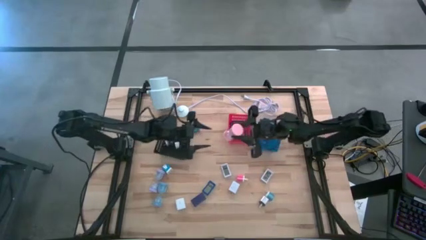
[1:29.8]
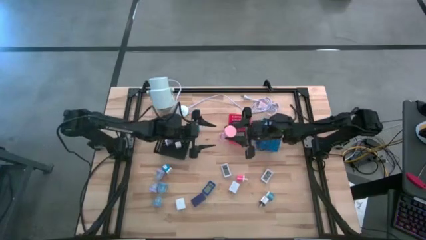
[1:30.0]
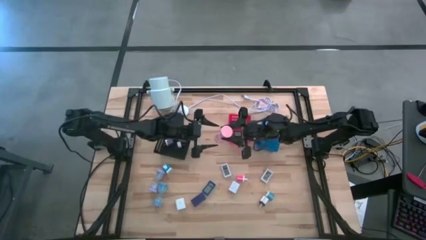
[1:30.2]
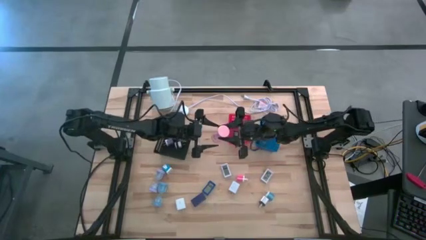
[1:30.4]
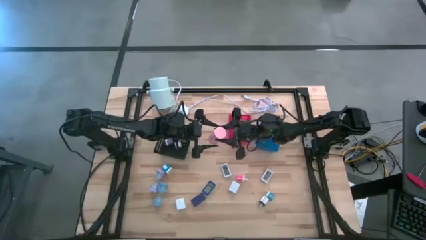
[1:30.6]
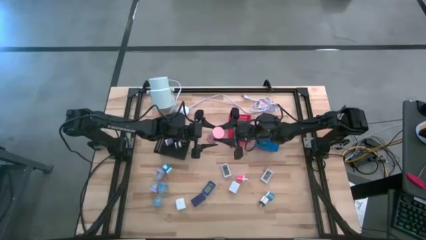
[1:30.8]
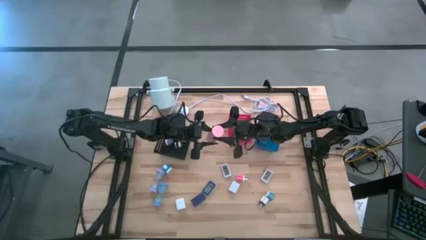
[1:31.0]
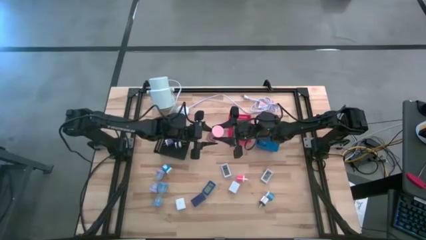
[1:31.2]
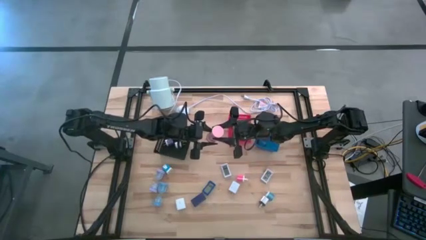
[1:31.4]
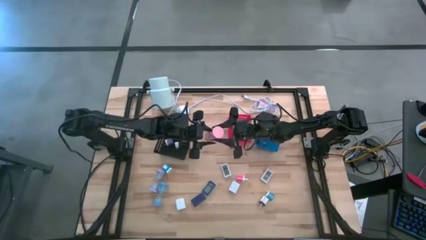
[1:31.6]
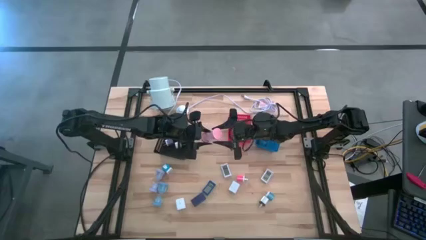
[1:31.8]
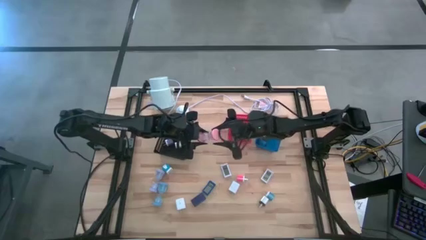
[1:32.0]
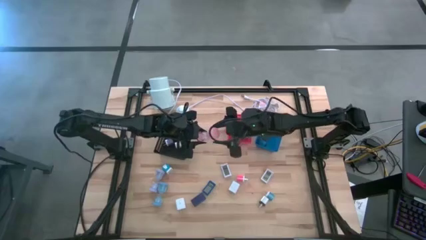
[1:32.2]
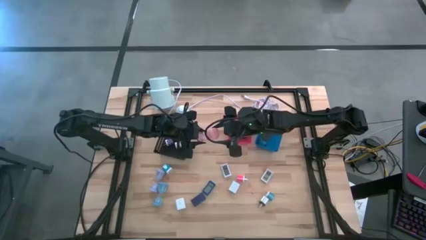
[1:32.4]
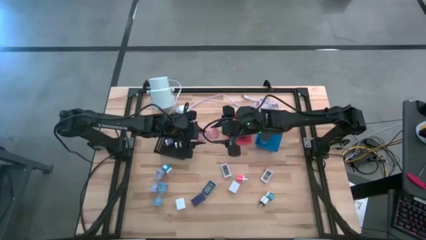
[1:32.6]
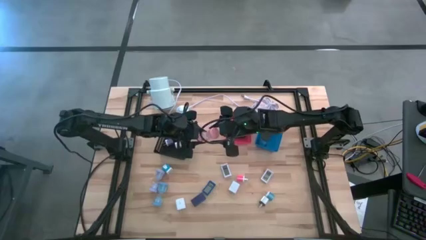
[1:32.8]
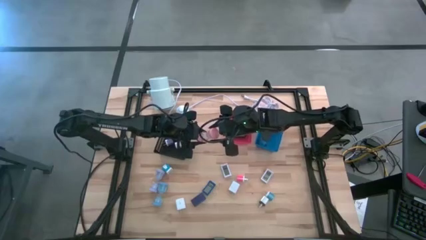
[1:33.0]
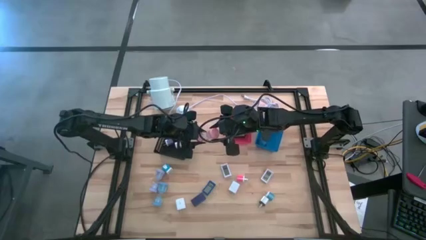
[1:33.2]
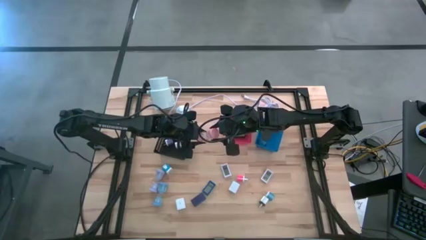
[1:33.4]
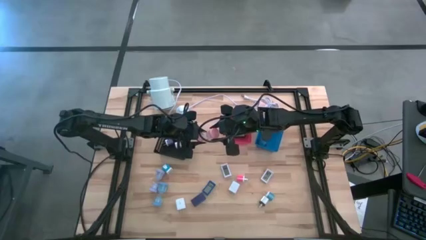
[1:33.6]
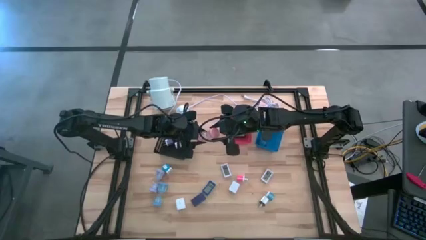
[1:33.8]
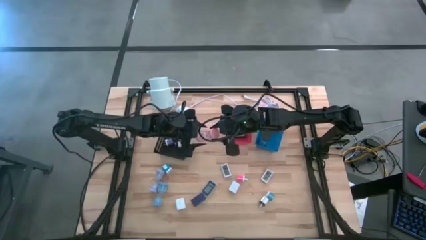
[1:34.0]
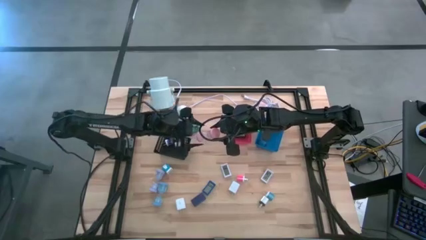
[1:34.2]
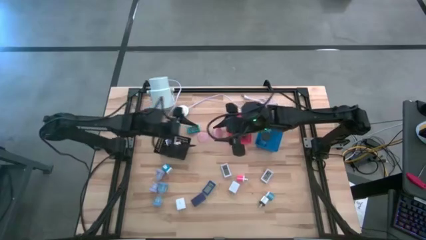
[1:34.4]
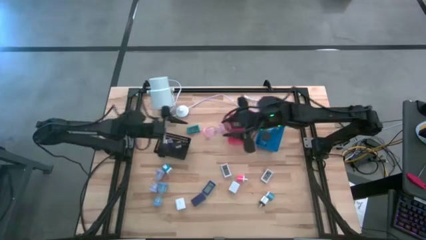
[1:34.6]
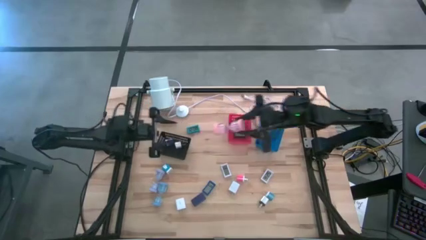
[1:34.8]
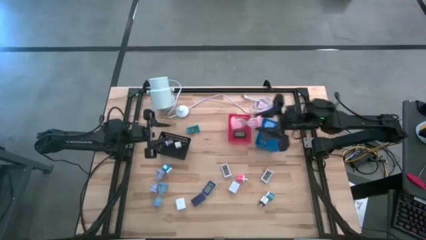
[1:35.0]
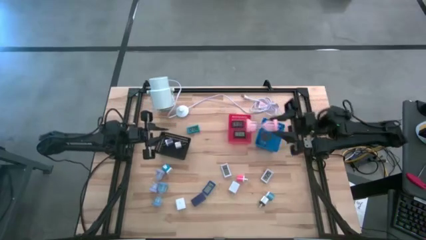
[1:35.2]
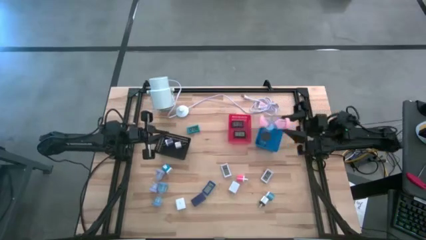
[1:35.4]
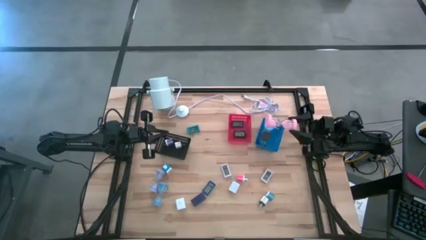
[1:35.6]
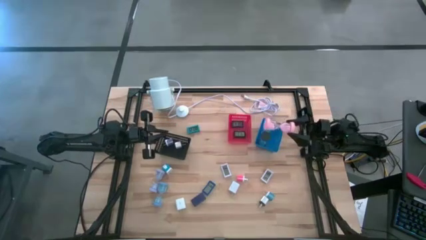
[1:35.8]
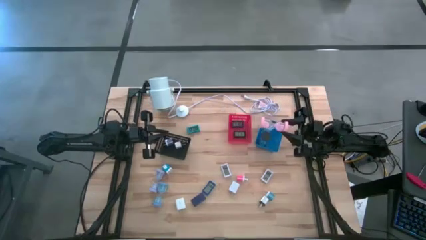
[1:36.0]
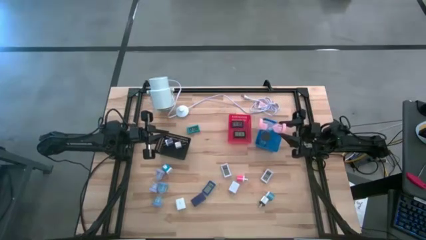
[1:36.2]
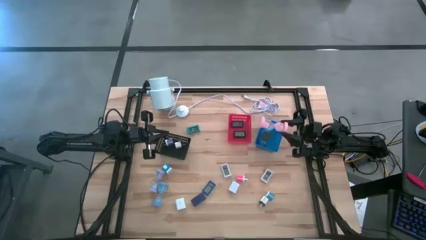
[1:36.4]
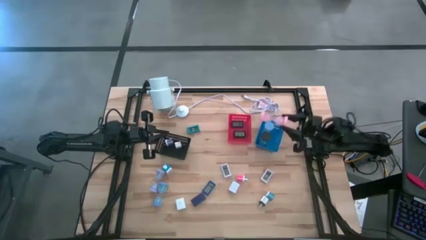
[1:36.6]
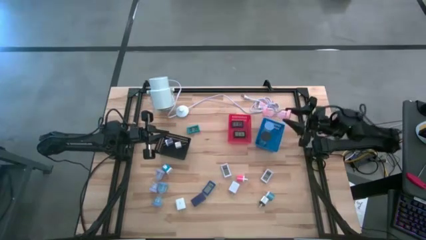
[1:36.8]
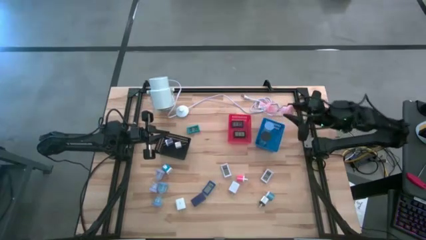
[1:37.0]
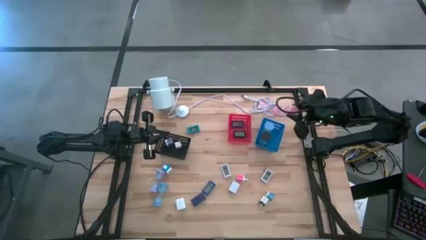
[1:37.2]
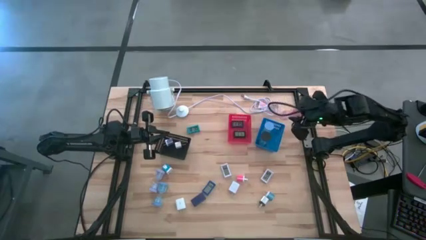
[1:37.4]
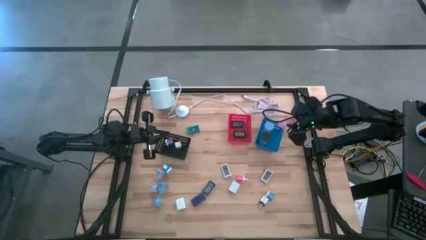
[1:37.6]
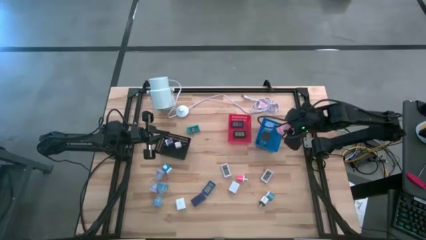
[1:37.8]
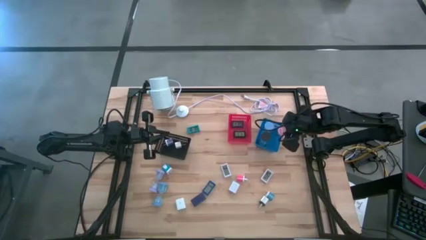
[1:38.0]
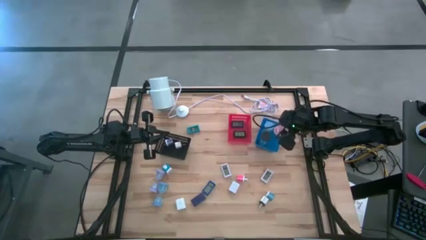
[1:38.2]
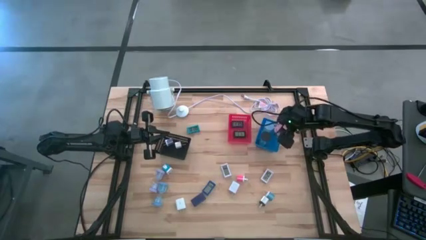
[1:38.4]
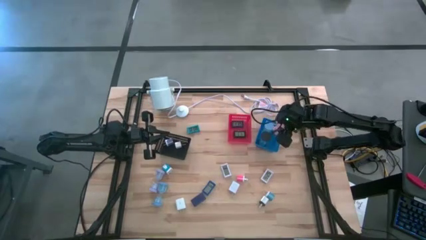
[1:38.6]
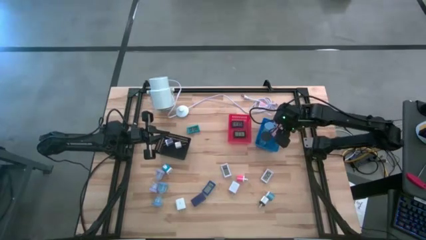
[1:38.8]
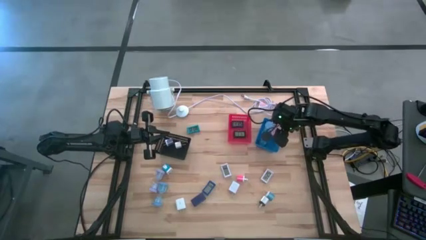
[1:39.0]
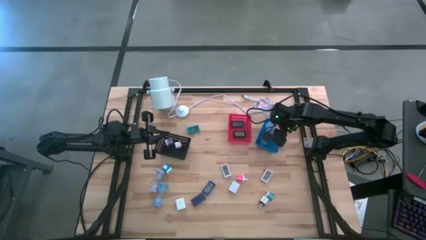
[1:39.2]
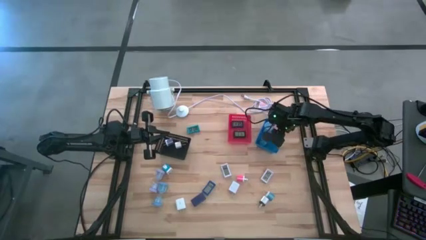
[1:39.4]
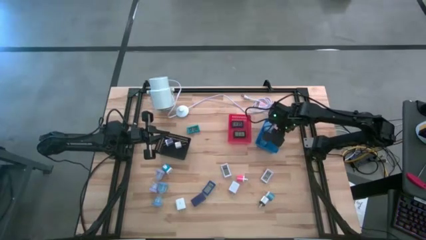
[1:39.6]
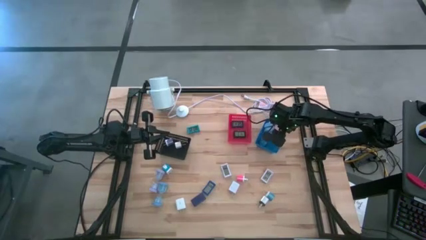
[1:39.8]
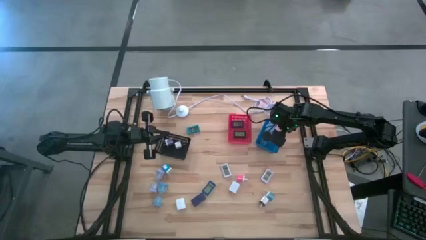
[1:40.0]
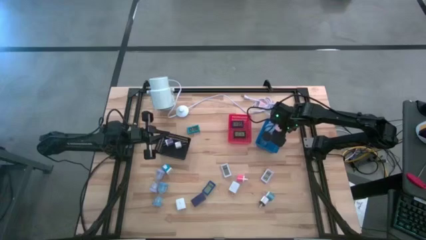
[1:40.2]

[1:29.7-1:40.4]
Task: Pick & Place Office items
Put the pink hourglass into the blue bin

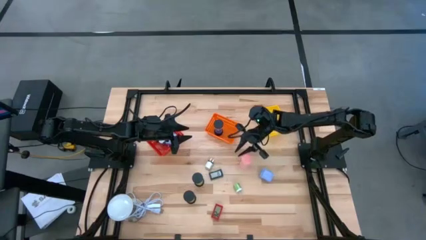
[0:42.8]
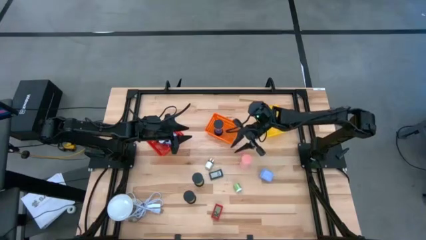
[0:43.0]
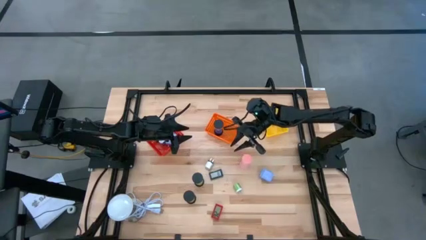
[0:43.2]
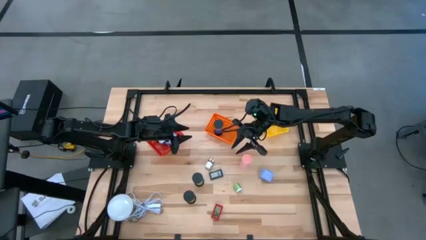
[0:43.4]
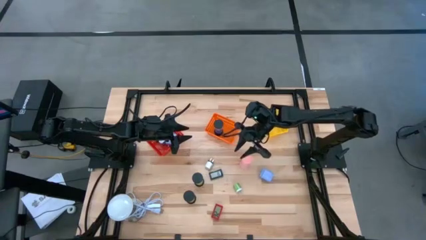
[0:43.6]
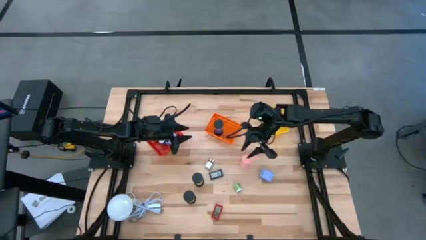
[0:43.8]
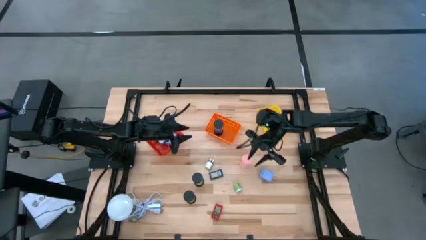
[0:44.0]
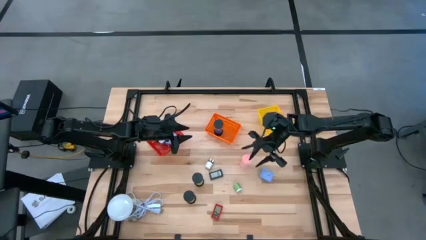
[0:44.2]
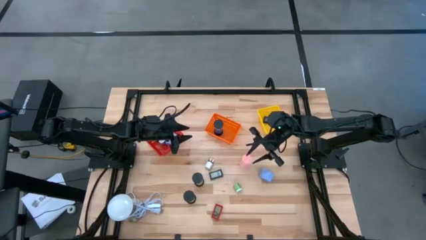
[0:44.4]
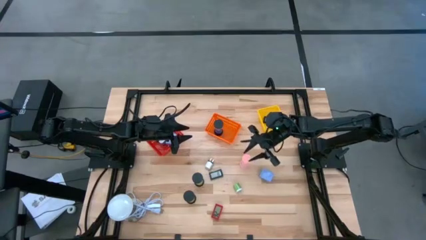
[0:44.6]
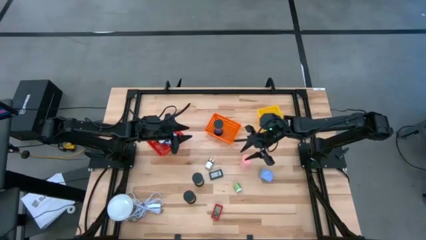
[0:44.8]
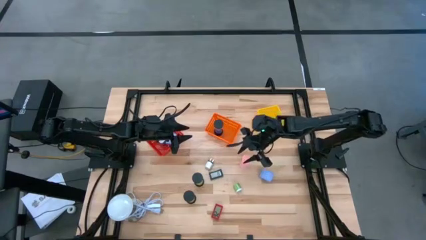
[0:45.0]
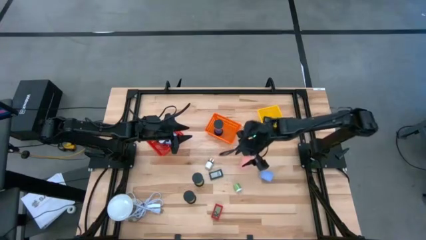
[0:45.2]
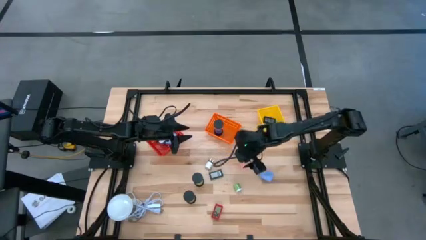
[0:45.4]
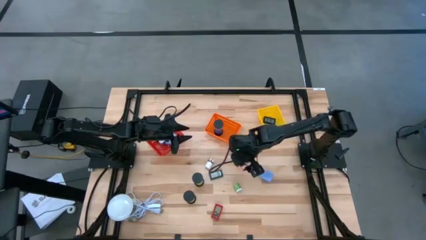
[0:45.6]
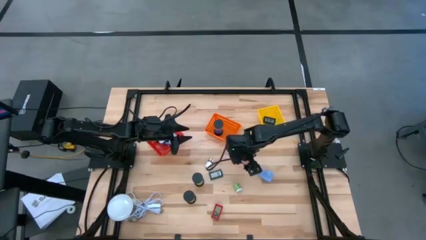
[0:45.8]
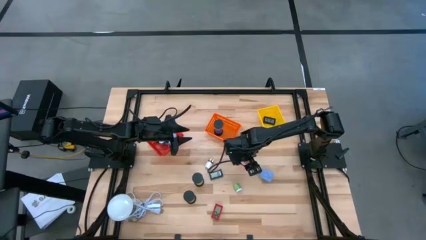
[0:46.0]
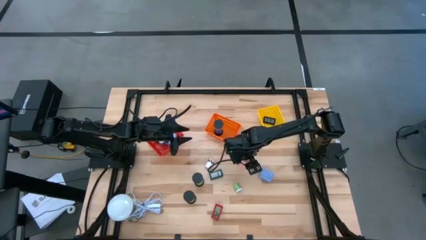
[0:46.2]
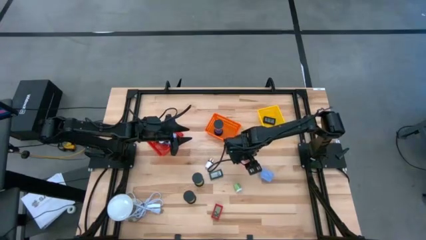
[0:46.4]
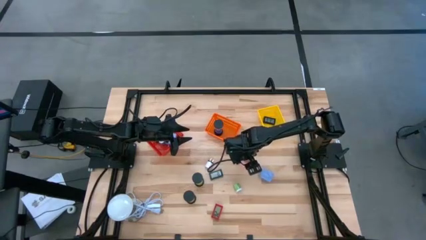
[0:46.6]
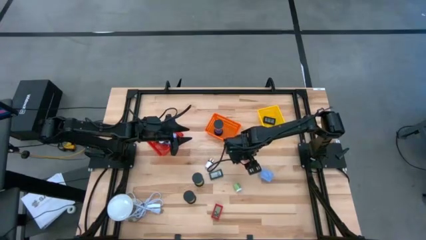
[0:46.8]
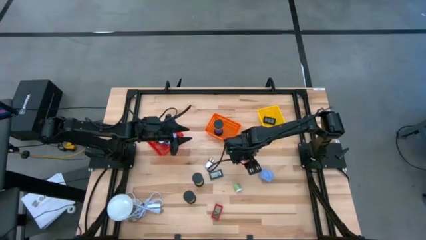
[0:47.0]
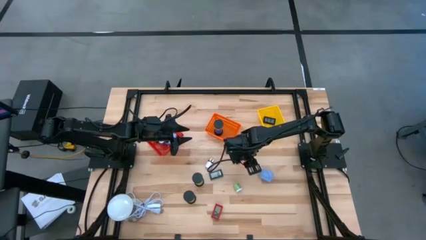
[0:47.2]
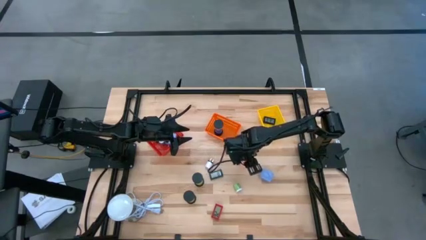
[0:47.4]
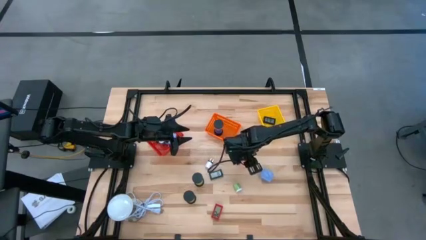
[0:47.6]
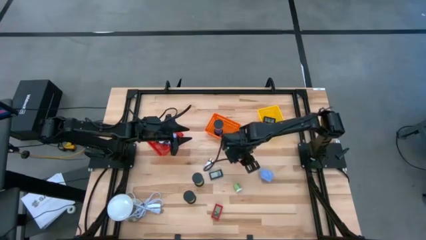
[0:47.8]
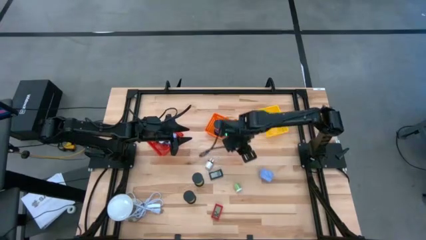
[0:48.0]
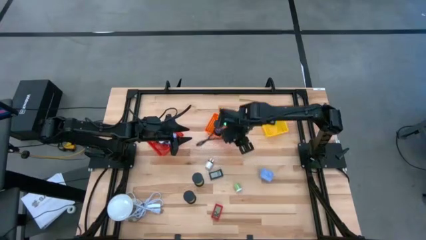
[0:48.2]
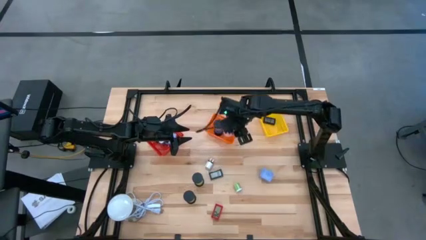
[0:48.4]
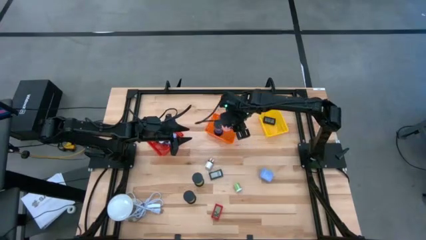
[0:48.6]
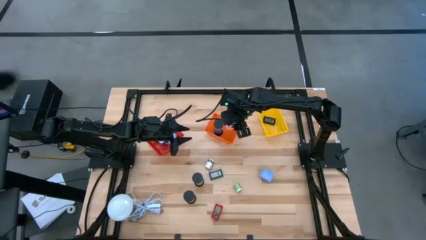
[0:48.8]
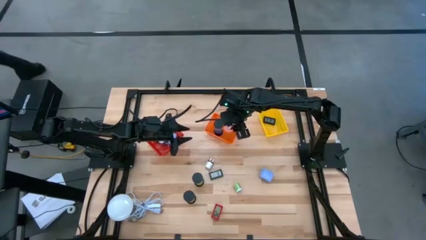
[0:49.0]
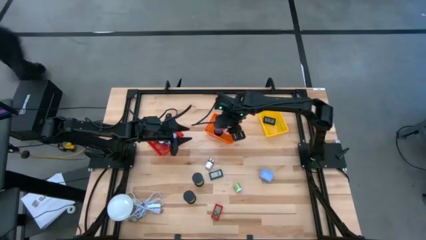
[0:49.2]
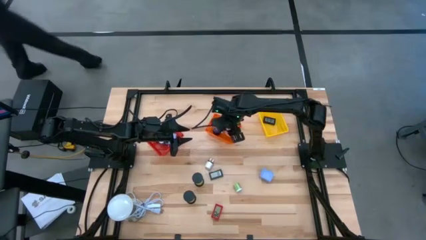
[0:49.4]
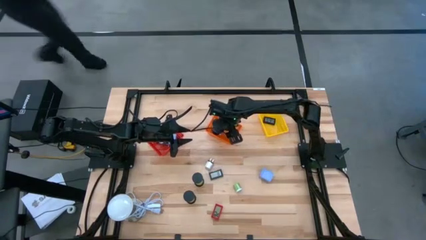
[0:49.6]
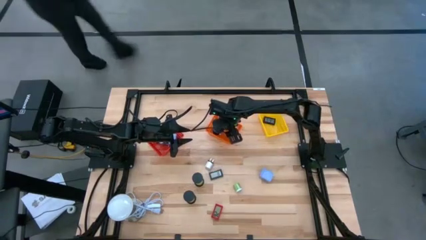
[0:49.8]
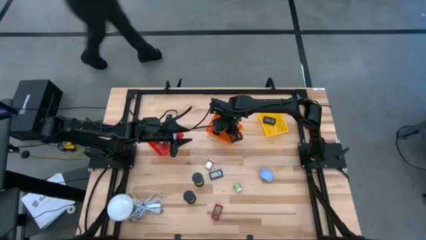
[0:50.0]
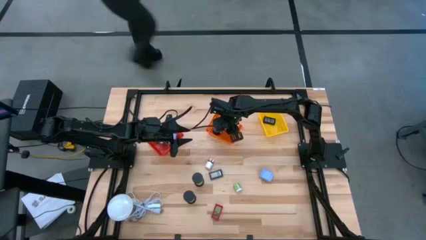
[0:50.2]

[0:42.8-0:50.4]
Task: Pick & Place Office items
Put the pink hourglass into the orange basket
